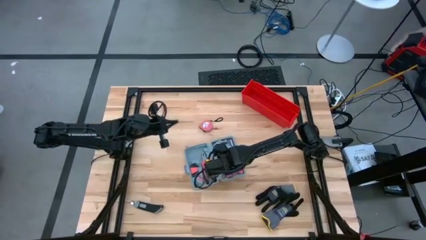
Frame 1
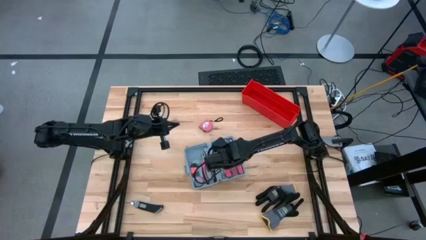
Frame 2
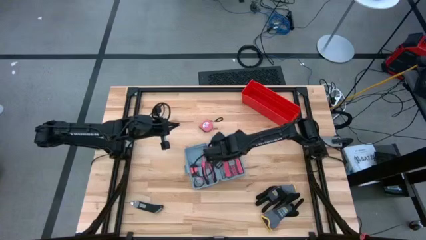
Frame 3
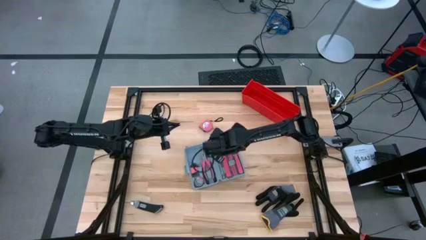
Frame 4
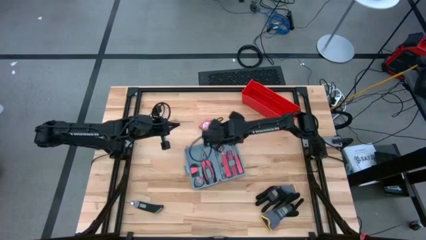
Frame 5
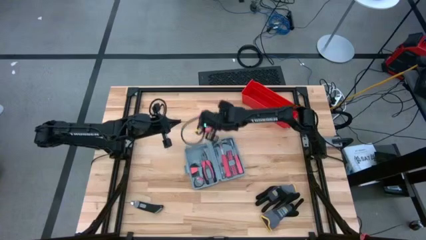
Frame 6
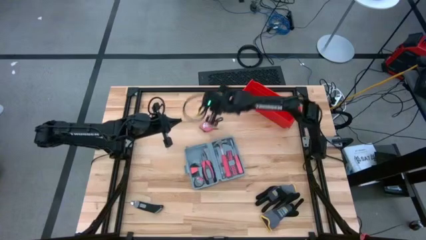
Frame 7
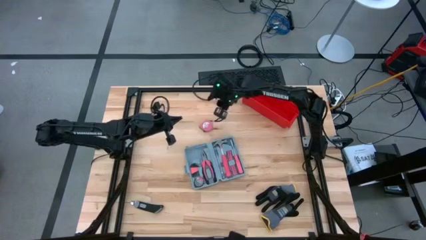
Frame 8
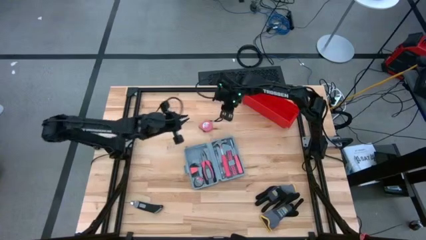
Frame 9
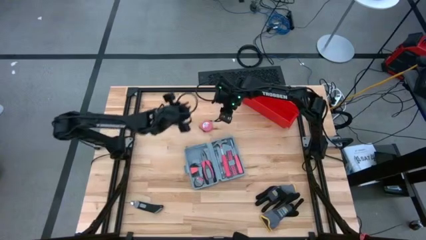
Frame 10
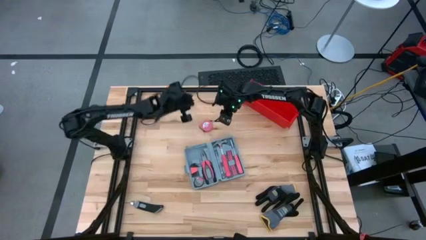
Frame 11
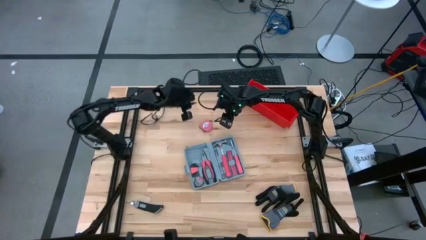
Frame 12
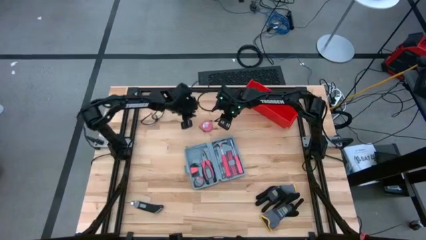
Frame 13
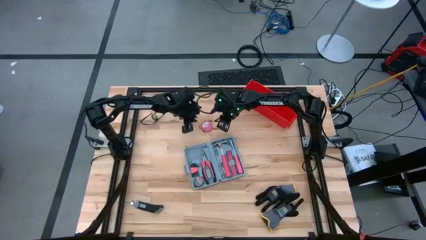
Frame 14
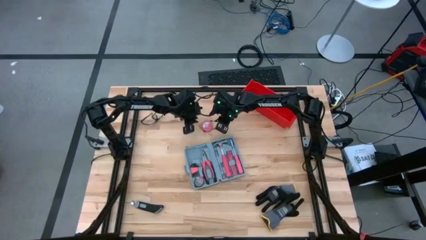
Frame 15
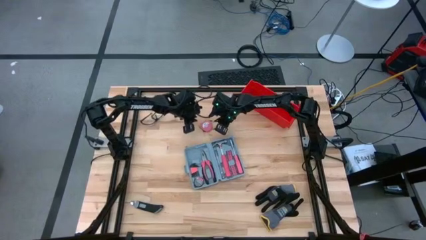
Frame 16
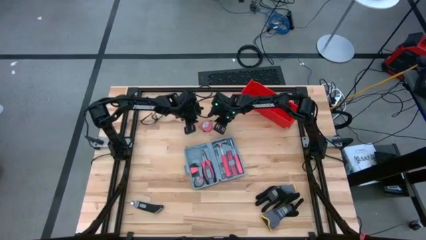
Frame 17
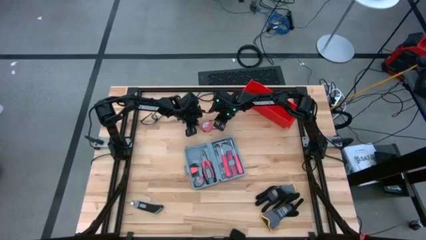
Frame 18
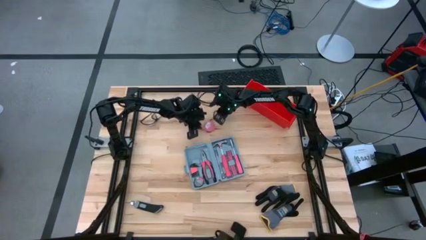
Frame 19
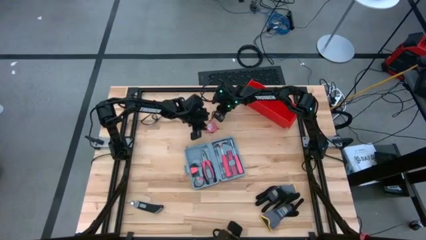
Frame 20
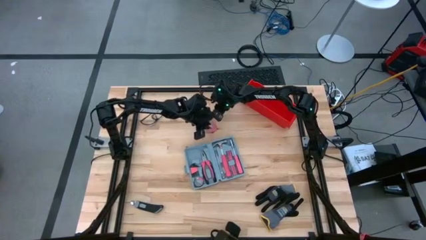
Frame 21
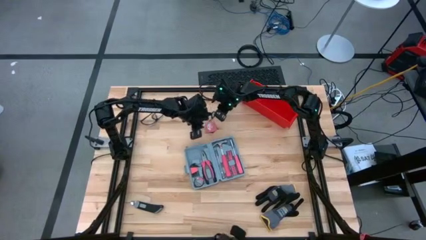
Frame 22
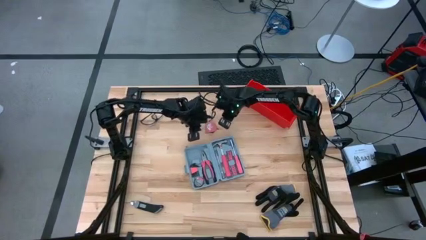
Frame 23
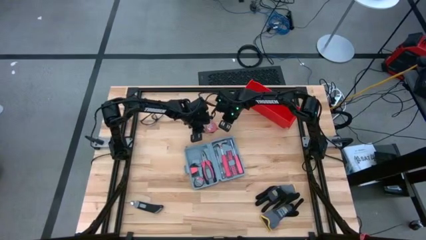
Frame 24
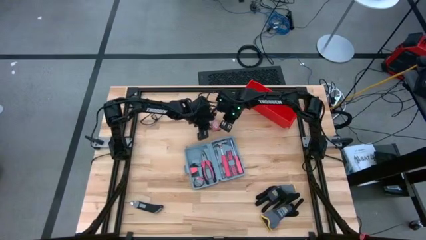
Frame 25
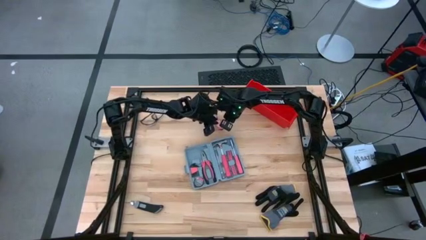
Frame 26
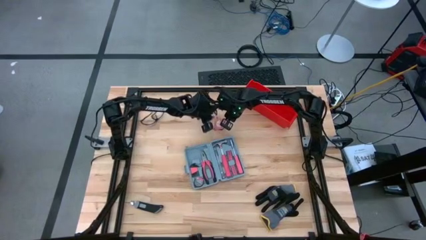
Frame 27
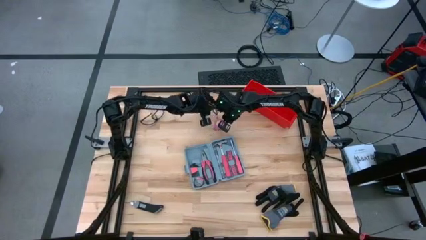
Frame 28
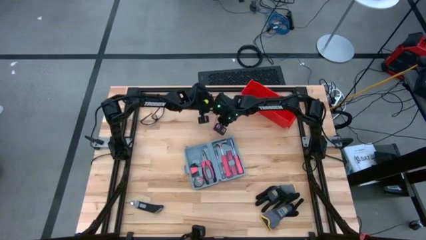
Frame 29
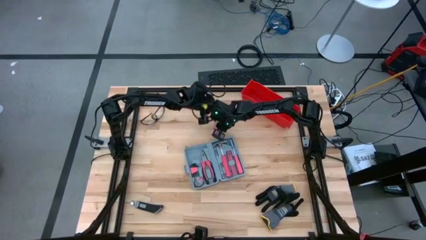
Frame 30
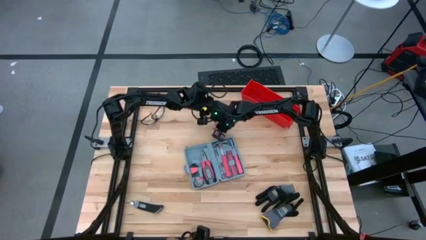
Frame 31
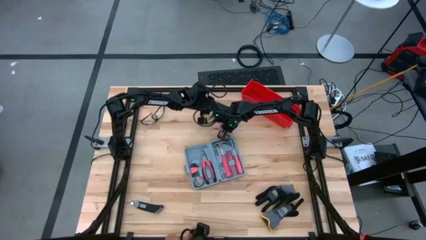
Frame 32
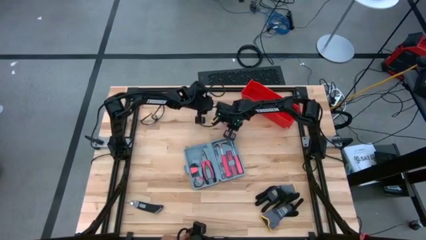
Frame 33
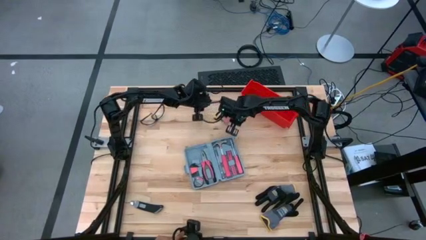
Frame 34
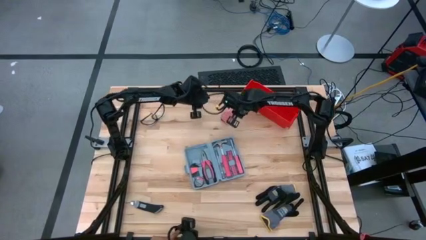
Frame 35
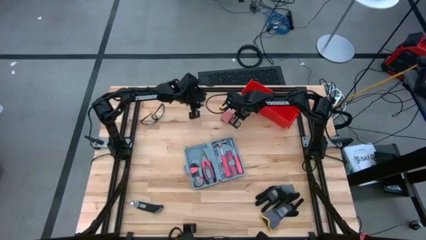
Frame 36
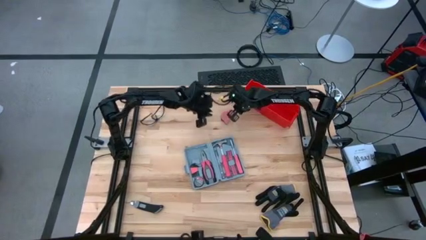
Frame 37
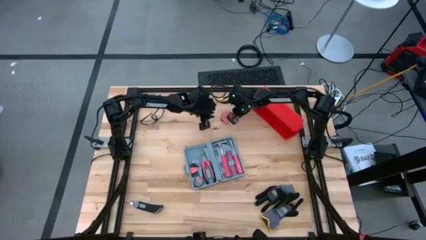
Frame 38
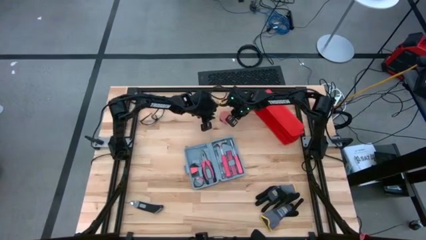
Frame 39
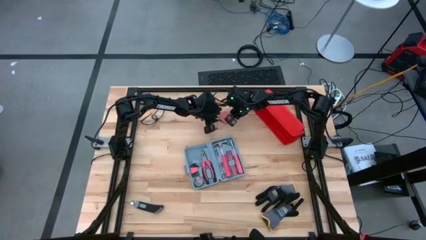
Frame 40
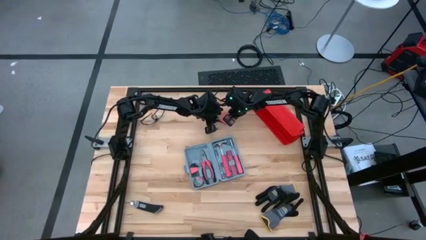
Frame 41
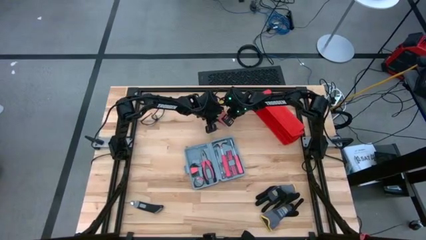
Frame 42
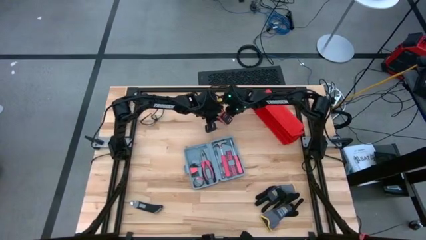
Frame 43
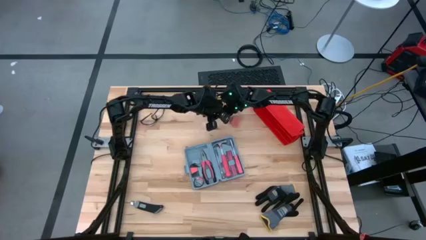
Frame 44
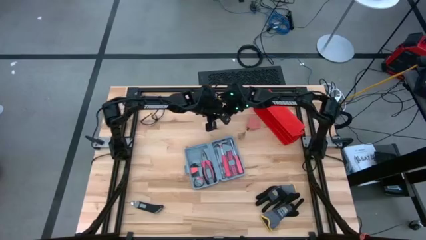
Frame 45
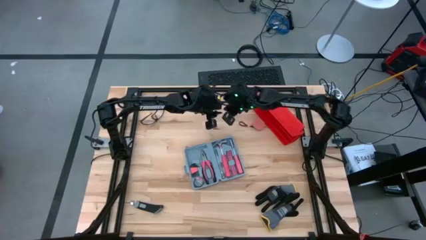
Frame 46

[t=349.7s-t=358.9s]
Task: prefit tool cases
Put the tape measure into the toolbox

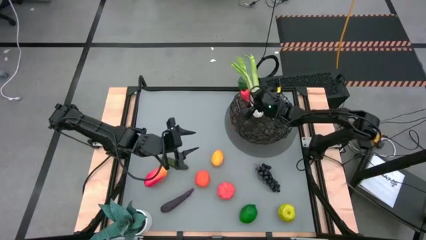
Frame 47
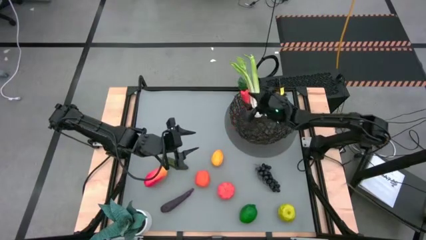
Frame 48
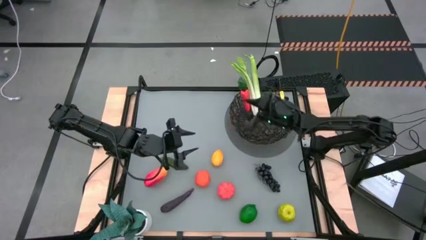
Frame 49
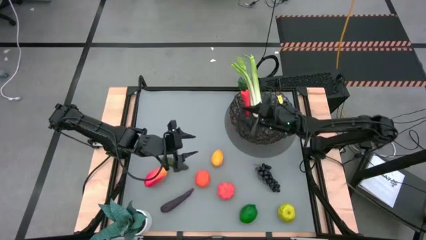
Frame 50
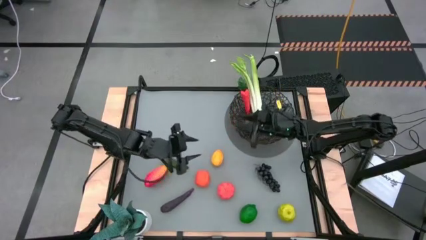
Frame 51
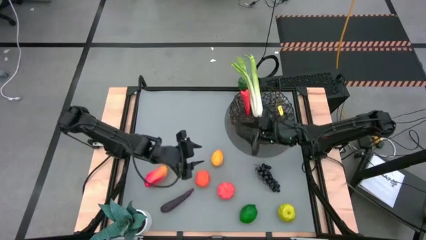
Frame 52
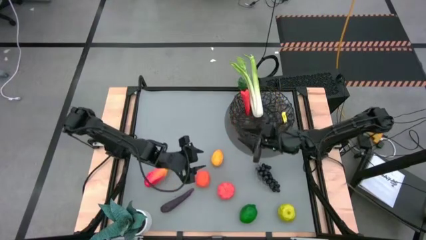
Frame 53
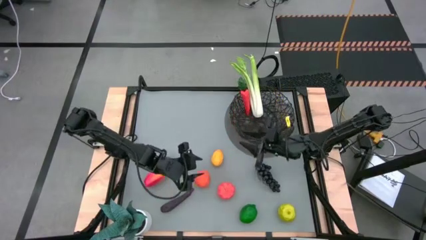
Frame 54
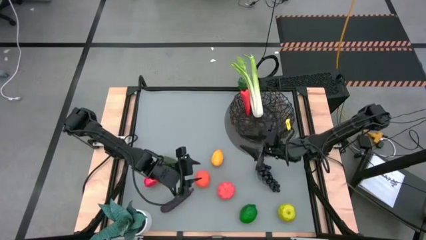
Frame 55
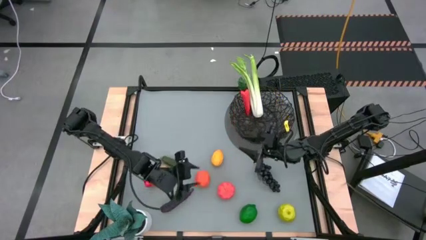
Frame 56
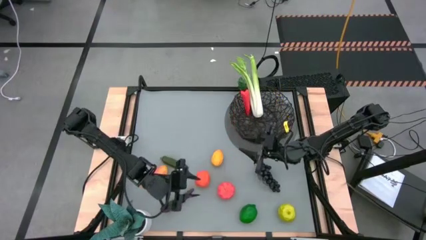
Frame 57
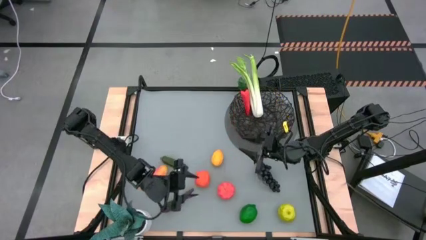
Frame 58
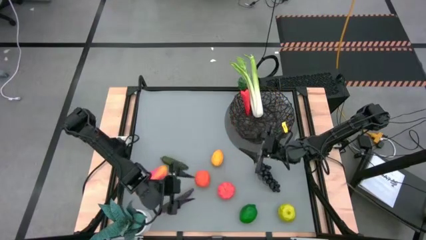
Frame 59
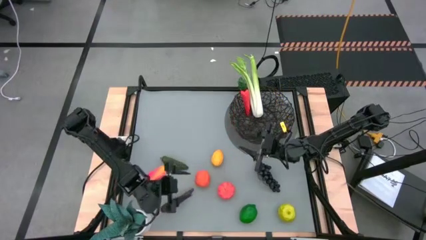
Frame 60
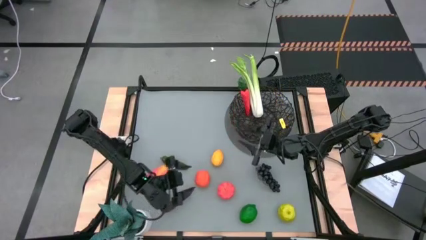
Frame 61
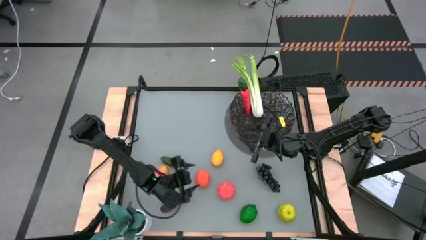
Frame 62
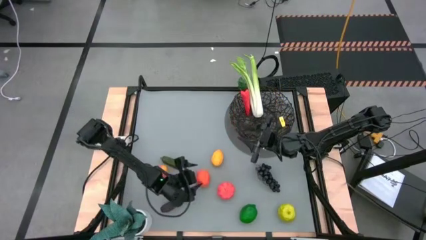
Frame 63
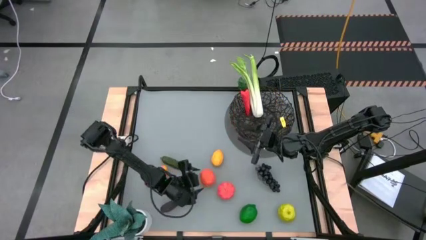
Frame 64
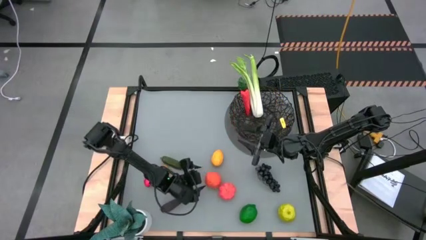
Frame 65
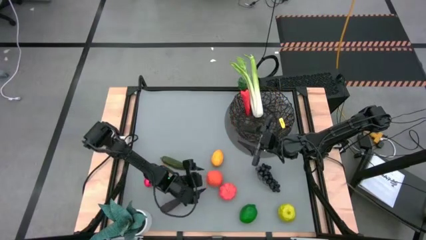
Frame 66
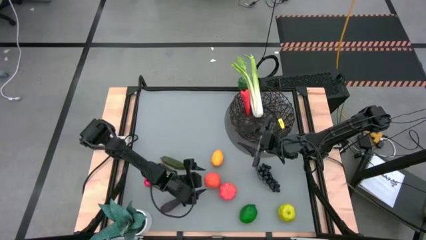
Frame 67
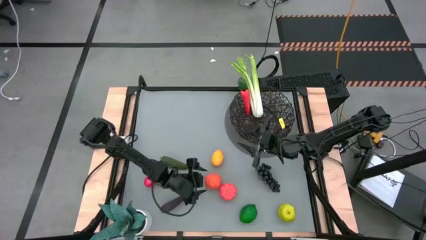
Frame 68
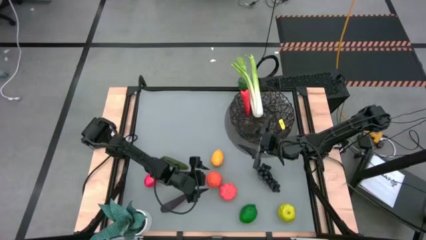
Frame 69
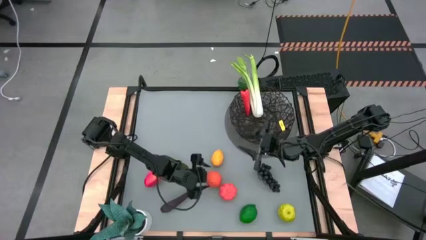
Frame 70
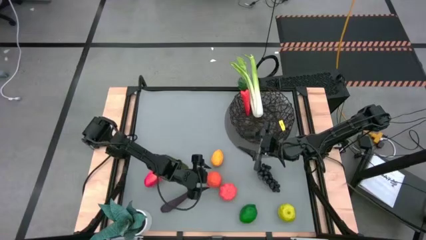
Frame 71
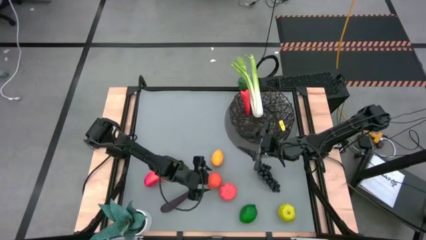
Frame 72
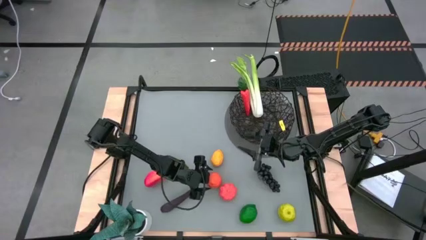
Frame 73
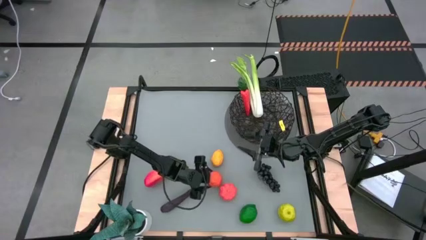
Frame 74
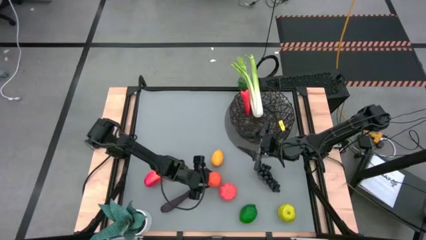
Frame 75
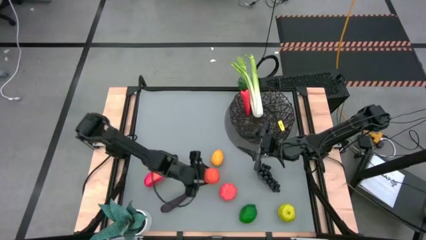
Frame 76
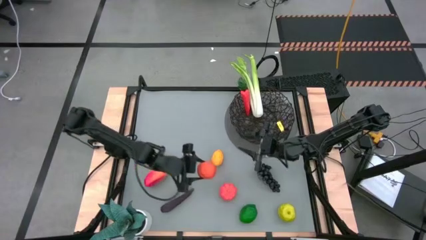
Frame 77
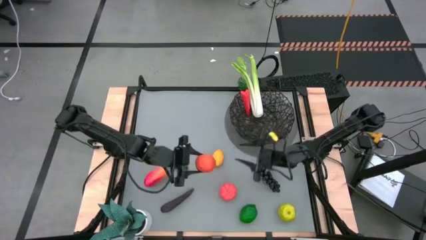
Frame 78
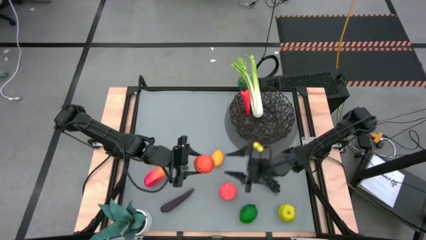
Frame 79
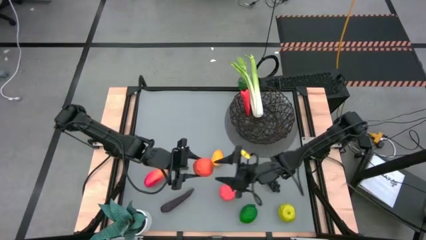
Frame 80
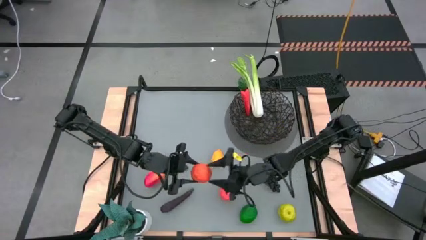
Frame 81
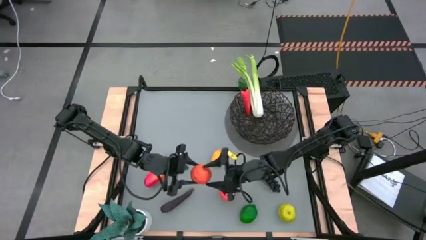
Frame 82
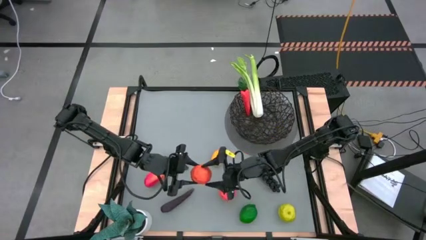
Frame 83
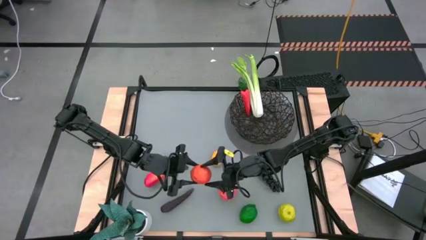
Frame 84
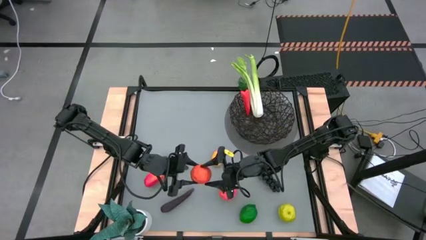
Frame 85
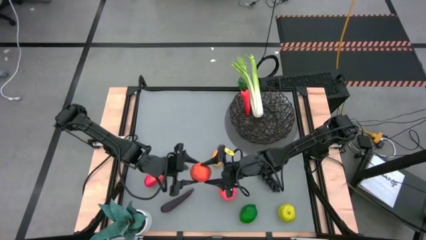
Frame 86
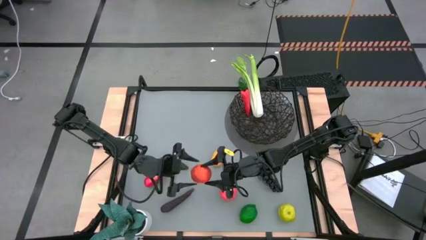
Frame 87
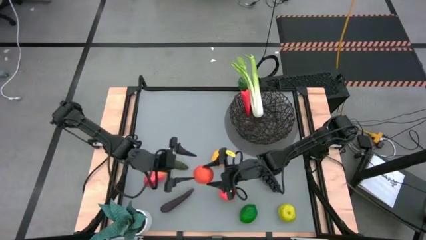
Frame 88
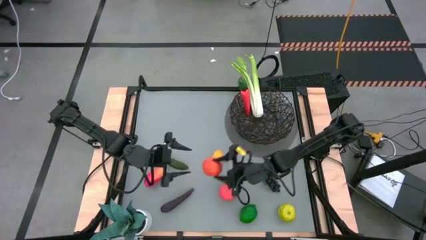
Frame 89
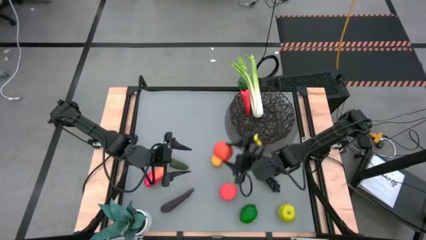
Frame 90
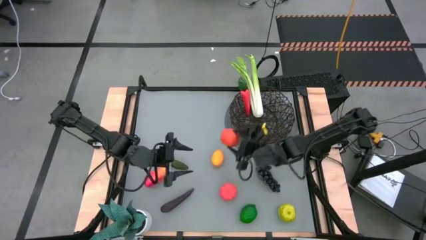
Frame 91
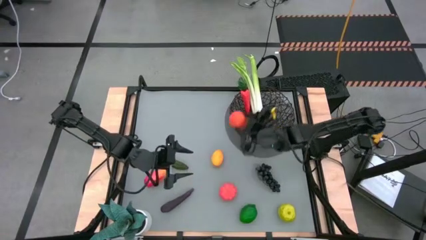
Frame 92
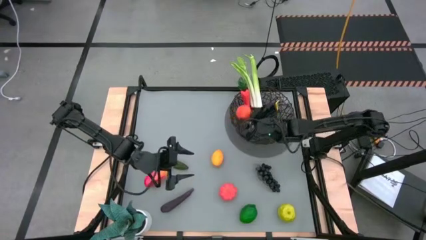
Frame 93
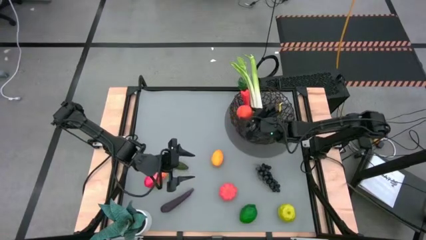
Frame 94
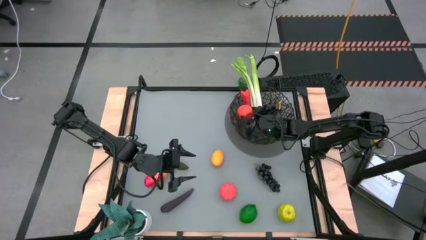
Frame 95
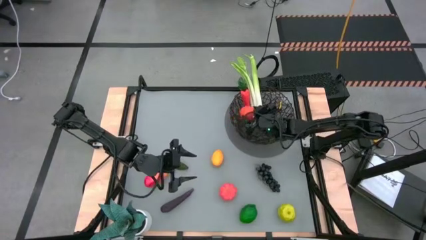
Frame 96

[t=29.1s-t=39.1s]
Task: Build produce basket
Put the orange into the black wire basket
